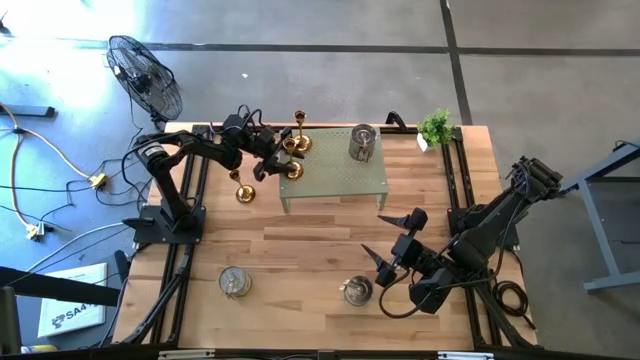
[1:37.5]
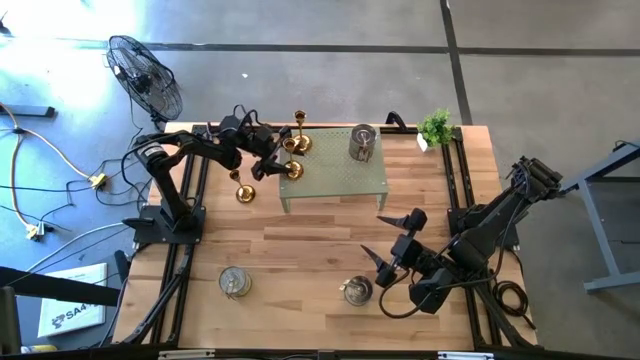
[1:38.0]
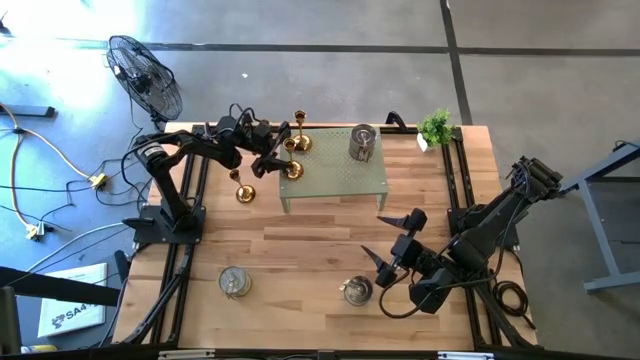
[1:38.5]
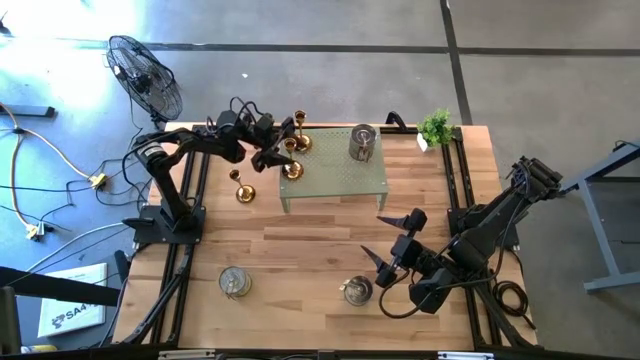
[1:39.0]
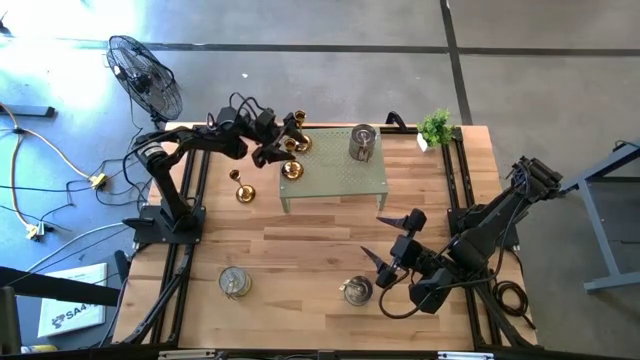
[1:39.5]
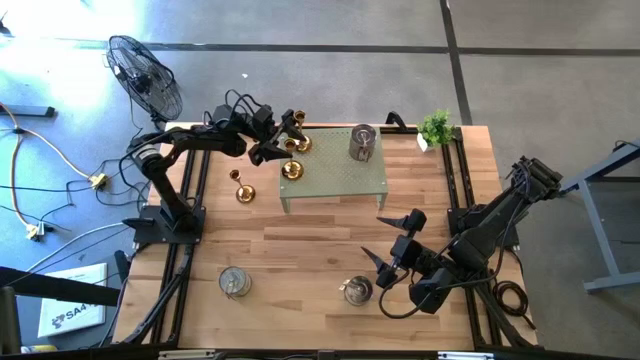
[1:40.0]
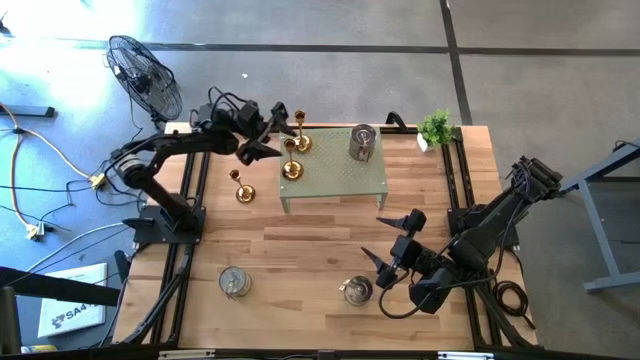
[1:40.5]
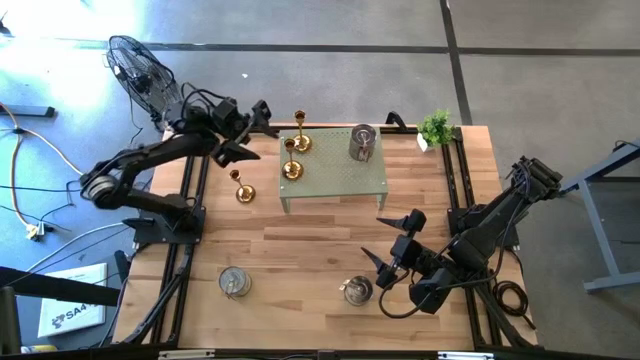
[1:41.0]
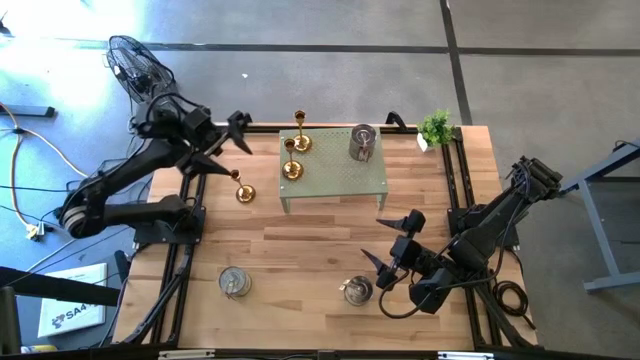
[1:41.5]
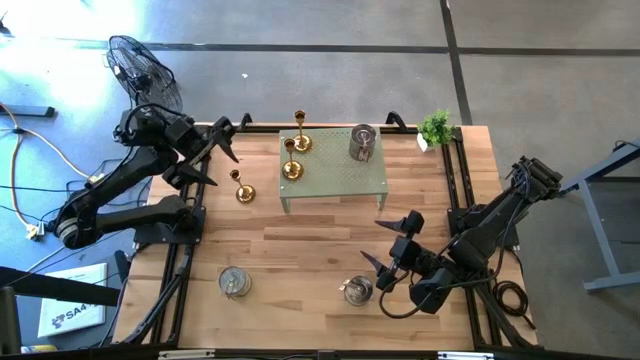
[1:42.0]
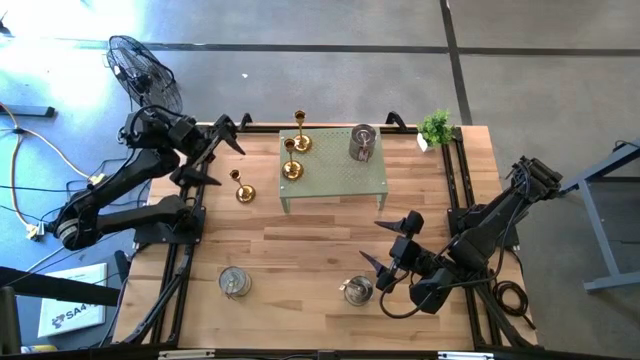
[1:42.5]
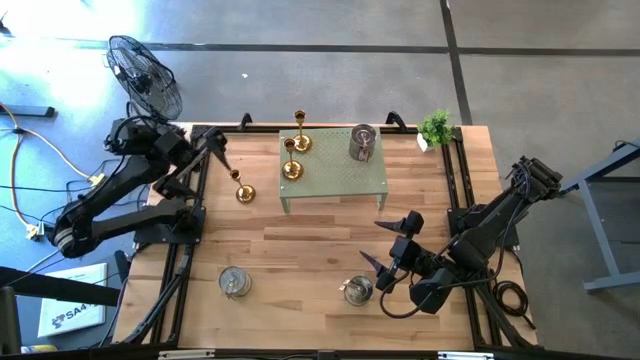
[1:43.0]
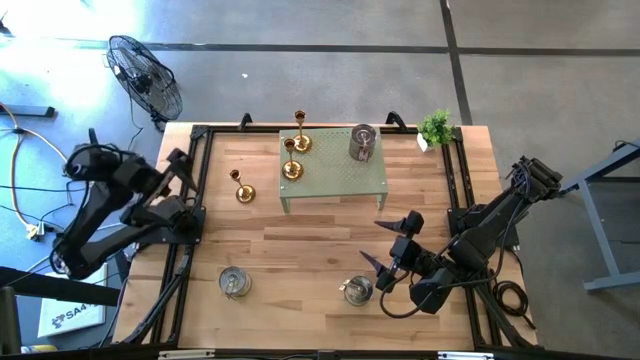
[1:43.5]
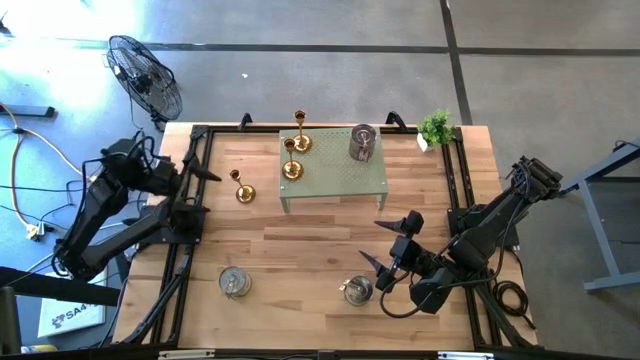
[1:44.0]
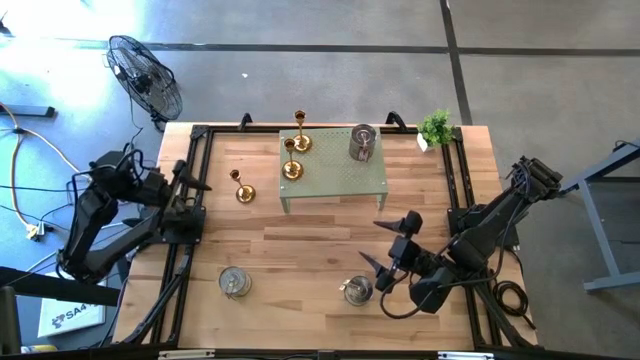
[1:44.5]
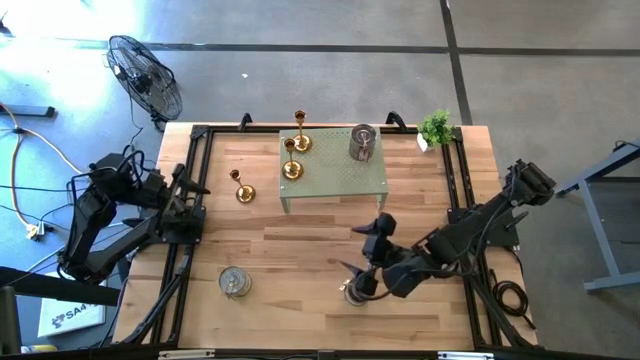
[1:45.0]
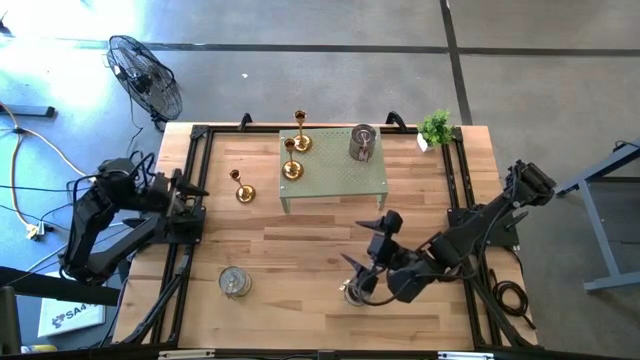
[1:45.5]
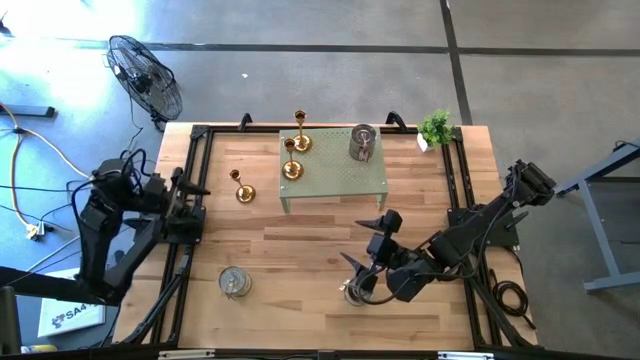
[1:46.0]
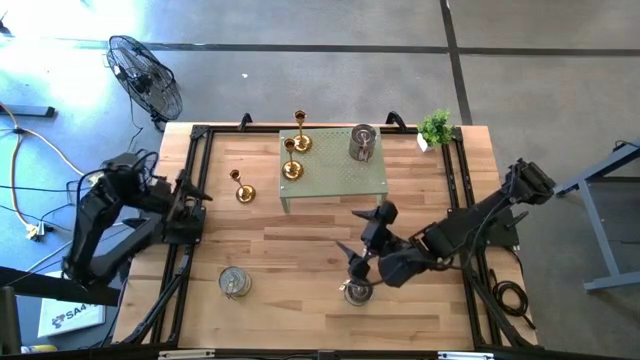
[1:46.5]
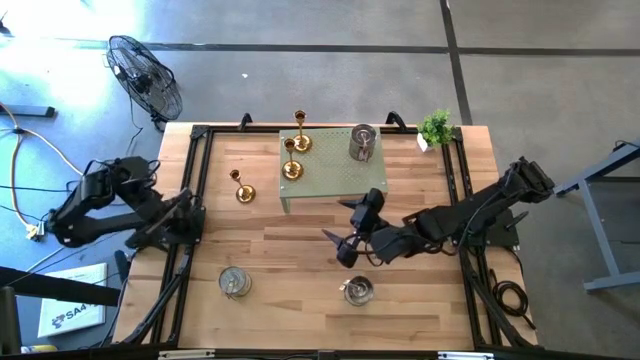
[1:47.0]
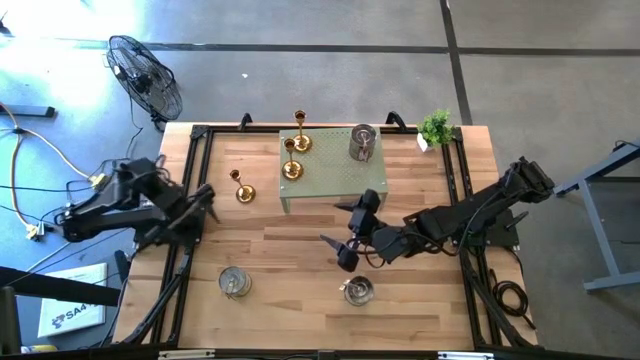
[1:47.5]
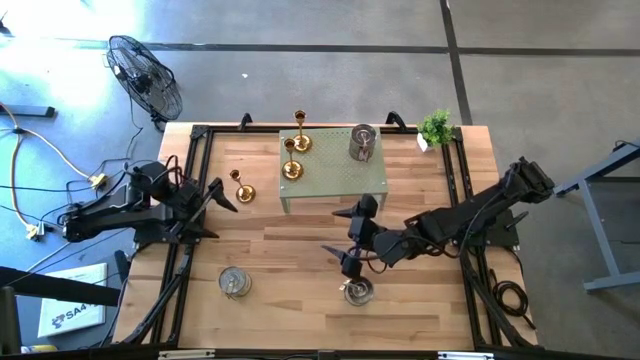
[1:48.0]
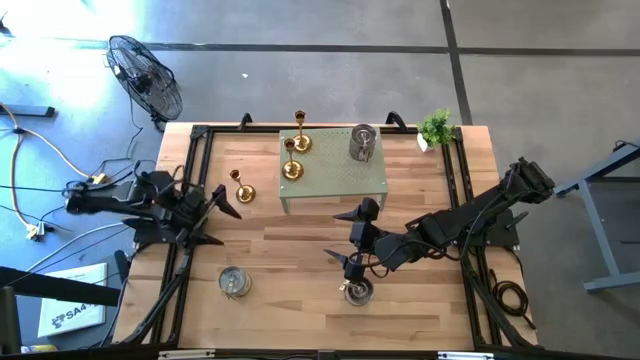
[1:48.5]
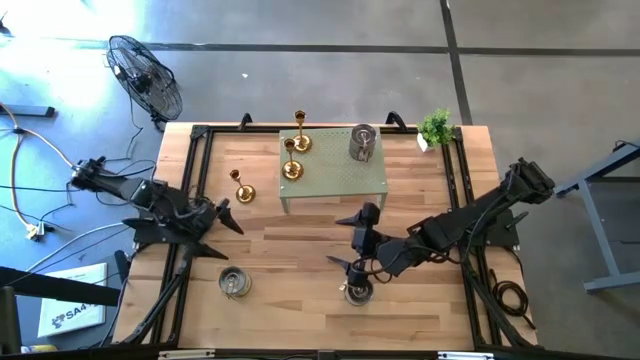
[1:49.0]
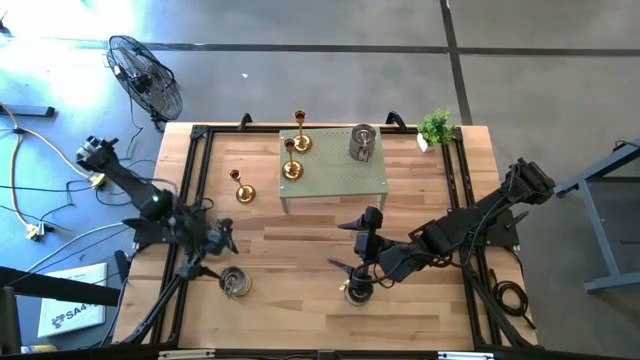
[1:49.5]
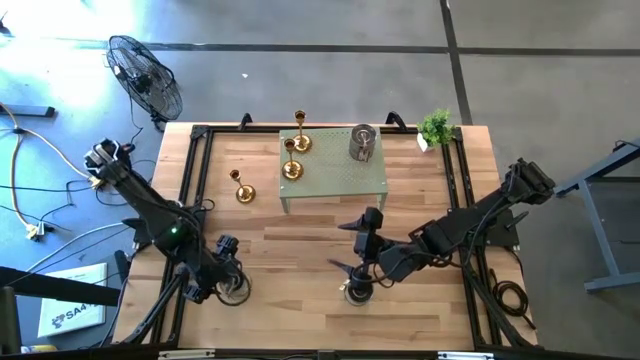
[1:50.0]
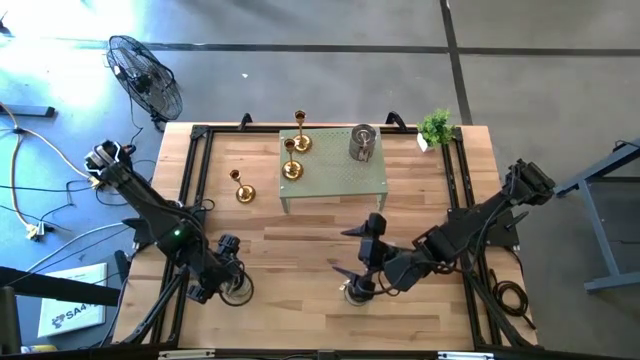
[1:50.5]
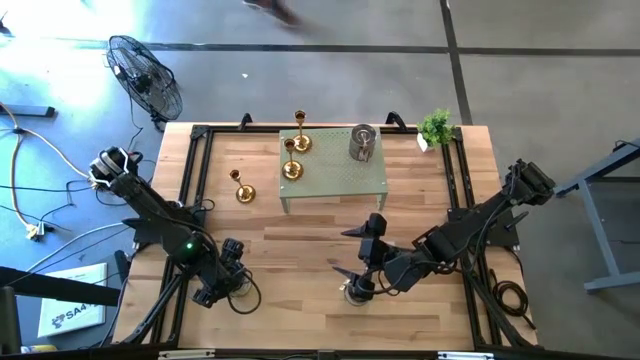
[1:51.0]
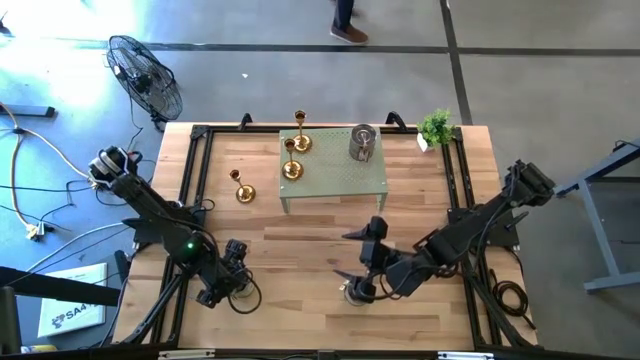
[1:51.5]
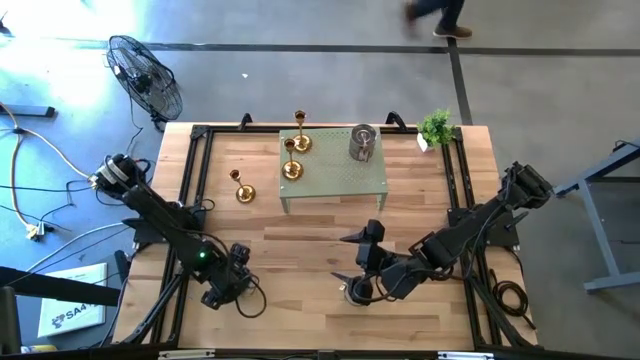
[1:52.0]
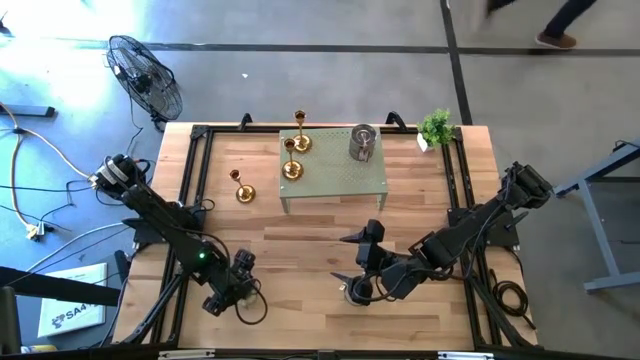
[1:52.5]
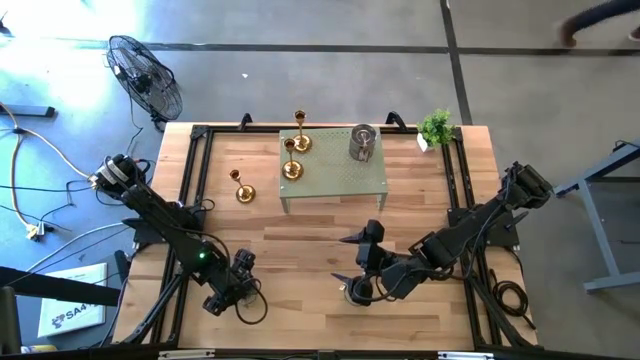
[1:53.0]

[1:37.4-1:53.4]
Task: Pick & Place candle stick holders
Put the left silver scented candle on the shelf

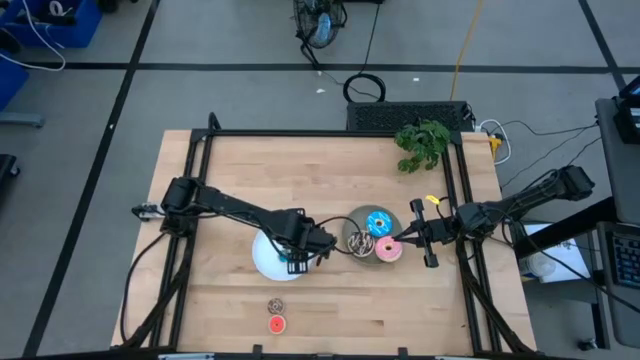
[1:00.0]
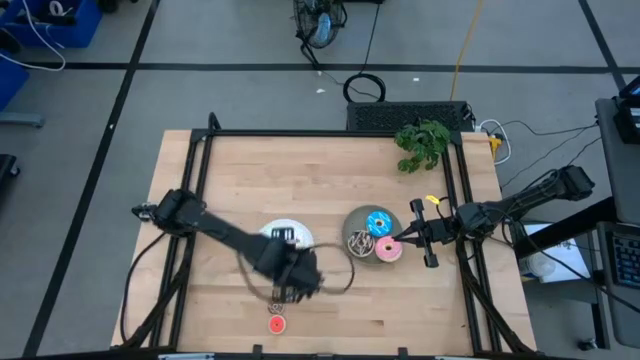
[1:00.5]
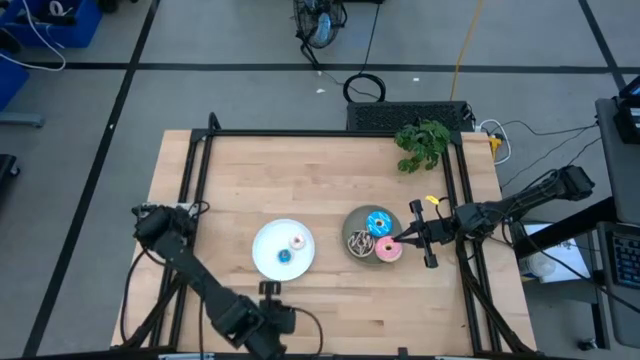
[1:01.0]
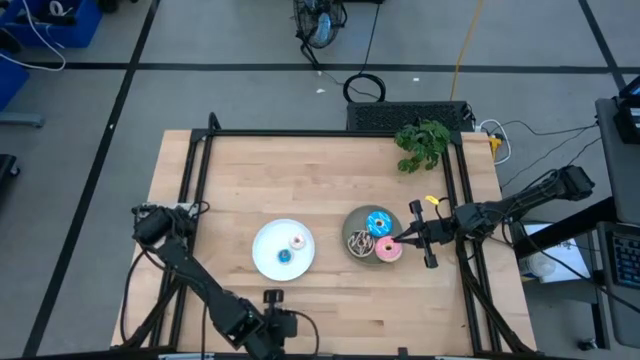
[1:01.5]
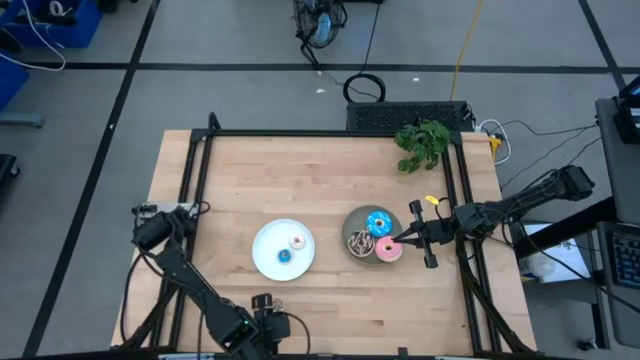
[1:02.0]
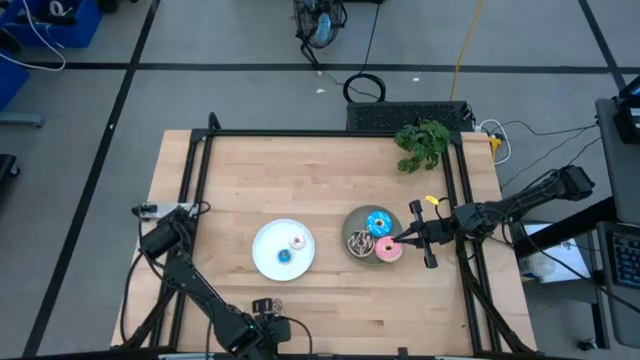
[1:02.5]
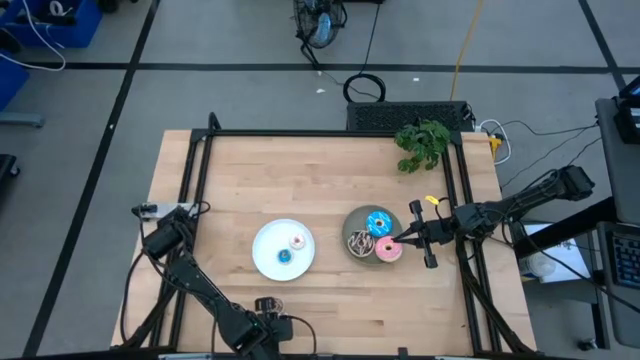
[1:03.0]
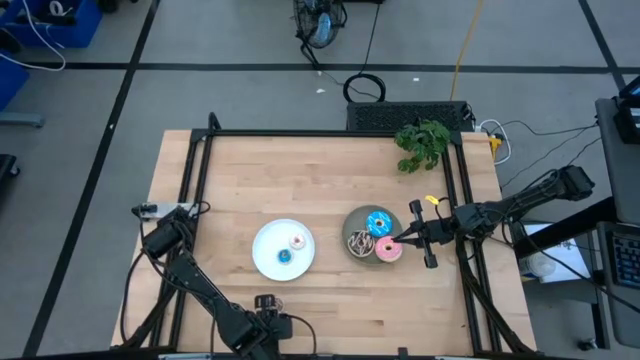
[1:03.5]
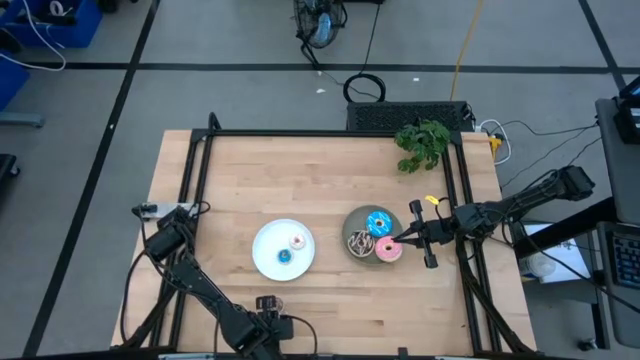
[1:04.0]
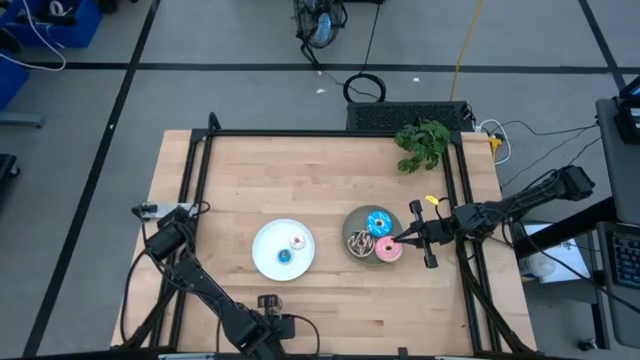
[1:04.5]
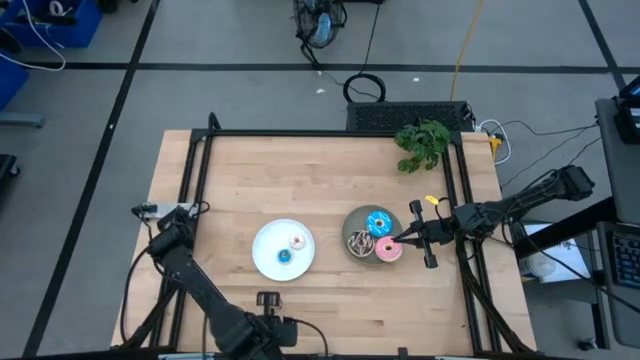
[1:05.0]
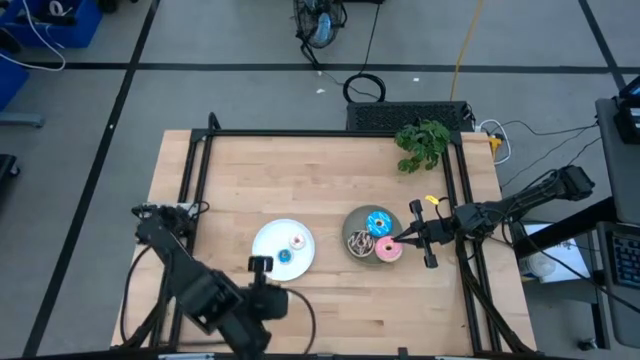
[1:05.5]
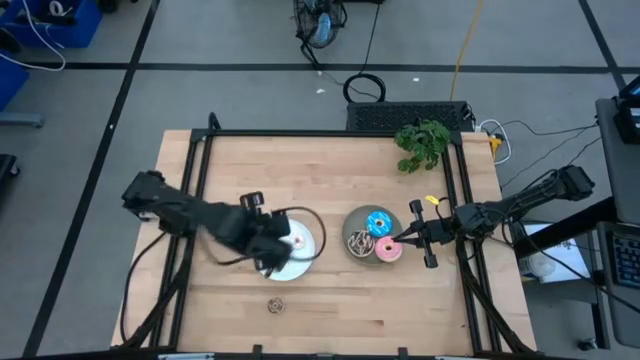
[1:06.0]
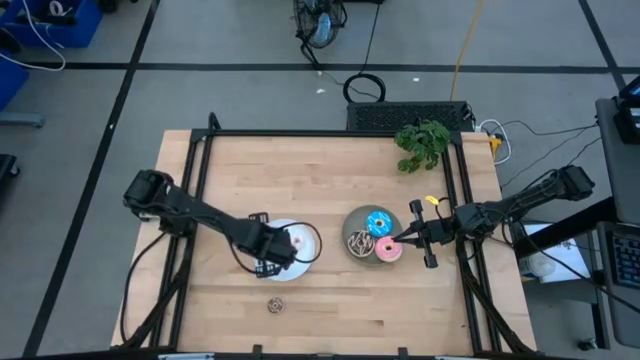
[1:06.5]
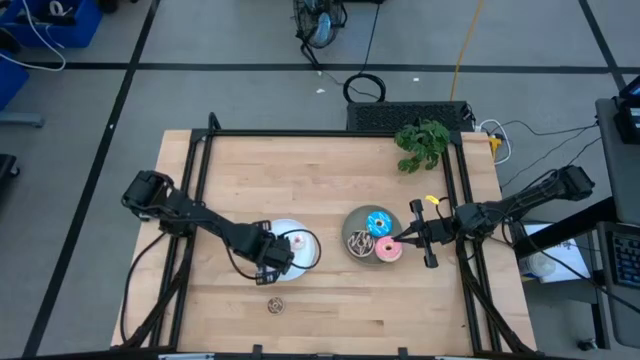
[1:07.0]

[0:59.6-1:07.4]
Task: Pick & Place donuts
Put the small orange donut on the white plate
